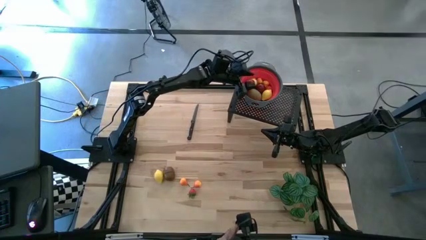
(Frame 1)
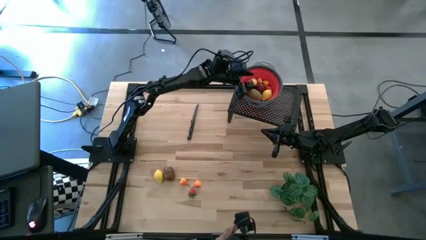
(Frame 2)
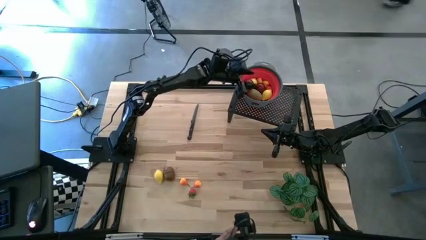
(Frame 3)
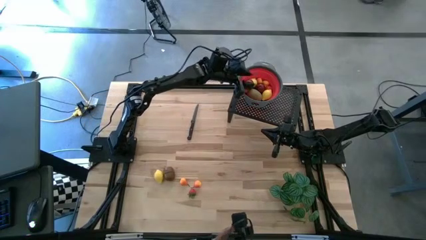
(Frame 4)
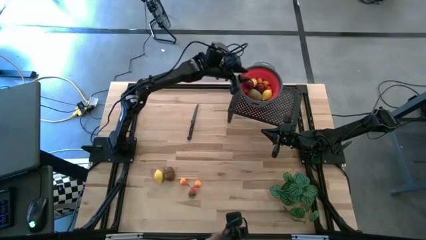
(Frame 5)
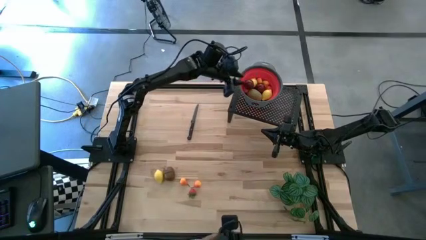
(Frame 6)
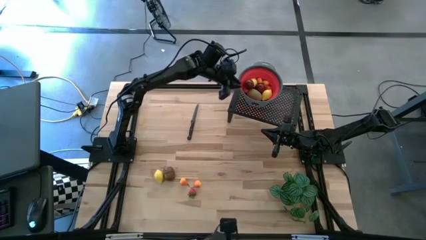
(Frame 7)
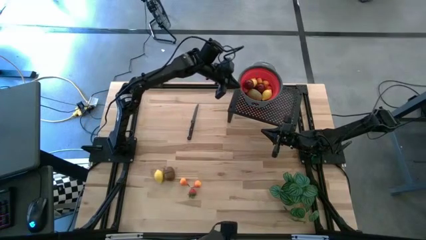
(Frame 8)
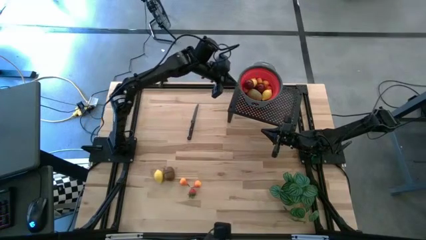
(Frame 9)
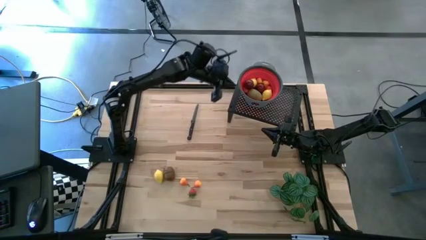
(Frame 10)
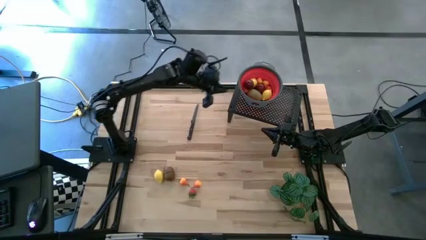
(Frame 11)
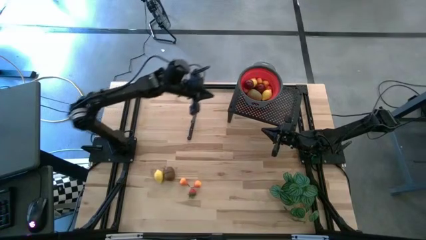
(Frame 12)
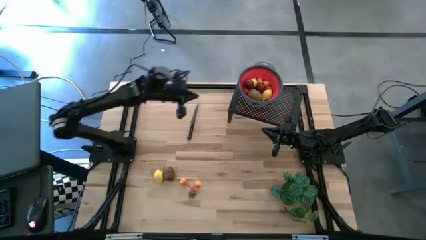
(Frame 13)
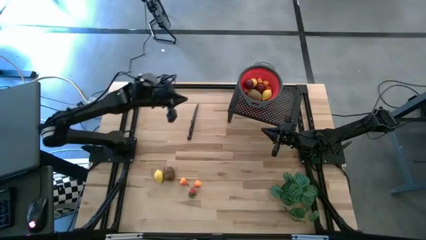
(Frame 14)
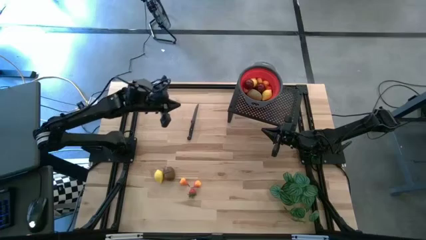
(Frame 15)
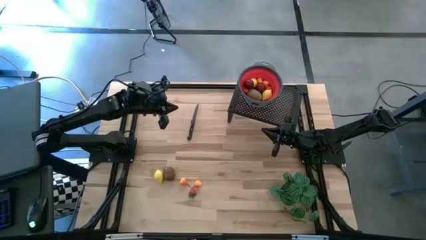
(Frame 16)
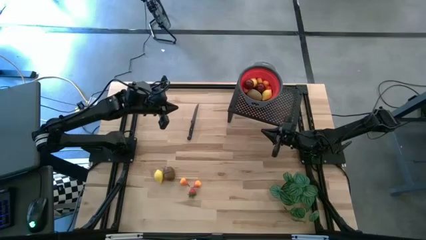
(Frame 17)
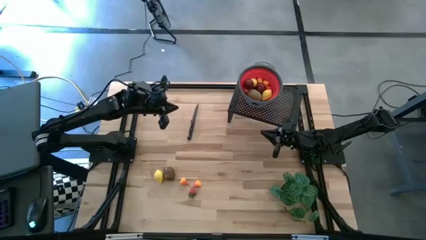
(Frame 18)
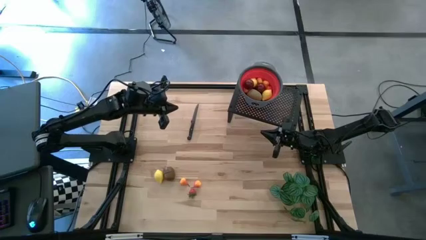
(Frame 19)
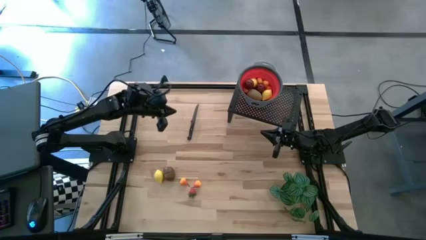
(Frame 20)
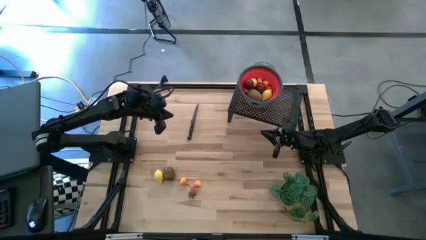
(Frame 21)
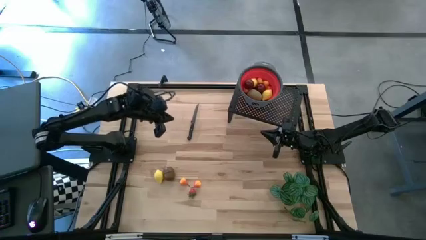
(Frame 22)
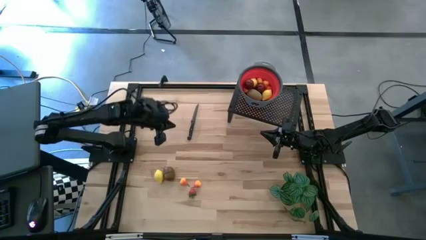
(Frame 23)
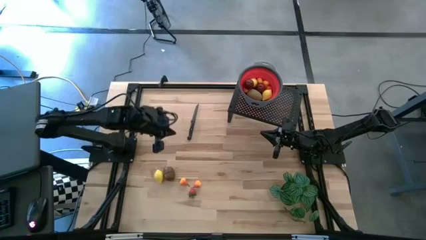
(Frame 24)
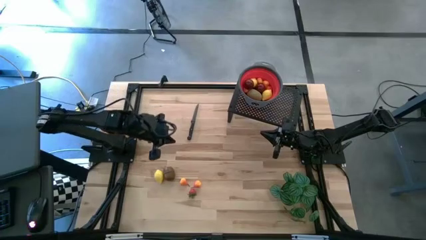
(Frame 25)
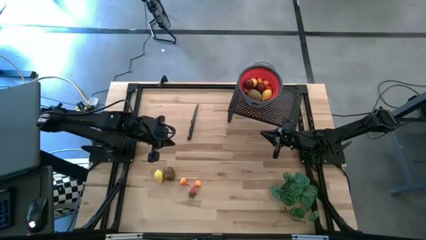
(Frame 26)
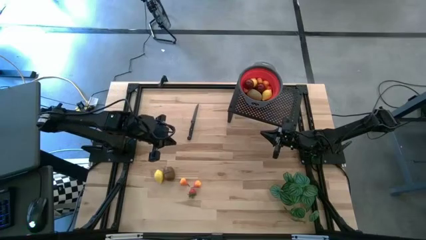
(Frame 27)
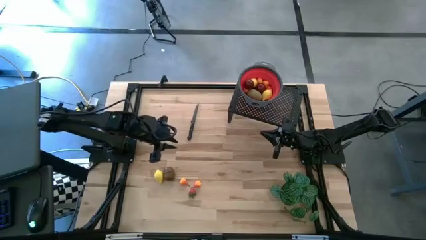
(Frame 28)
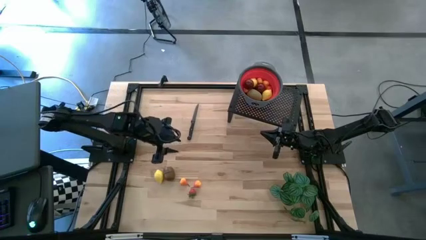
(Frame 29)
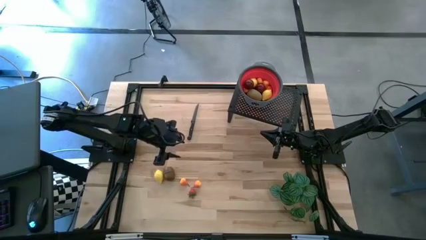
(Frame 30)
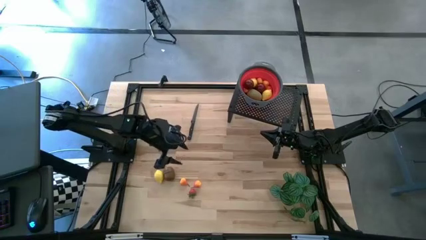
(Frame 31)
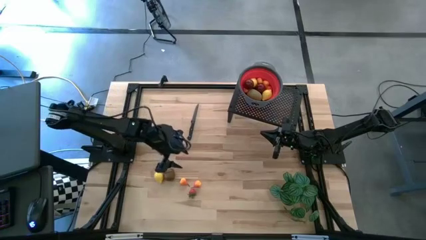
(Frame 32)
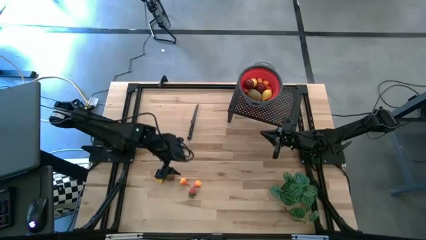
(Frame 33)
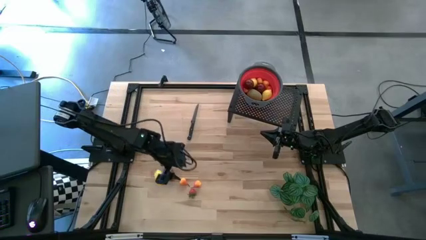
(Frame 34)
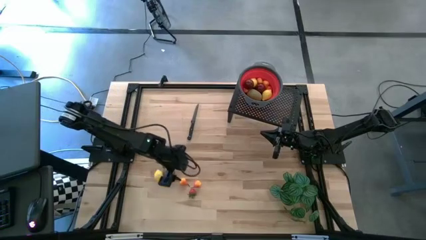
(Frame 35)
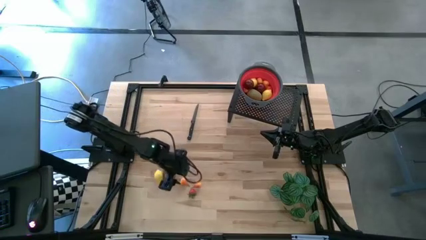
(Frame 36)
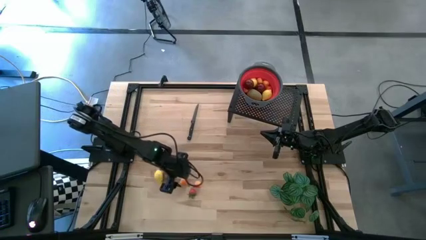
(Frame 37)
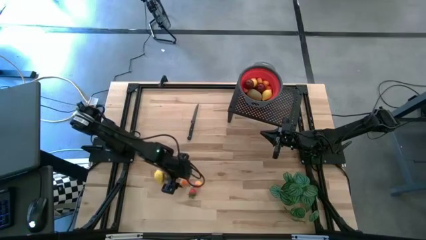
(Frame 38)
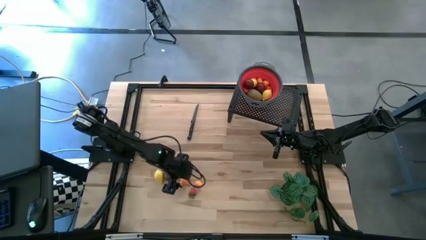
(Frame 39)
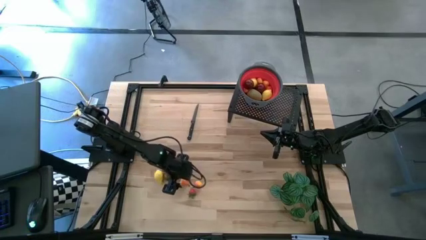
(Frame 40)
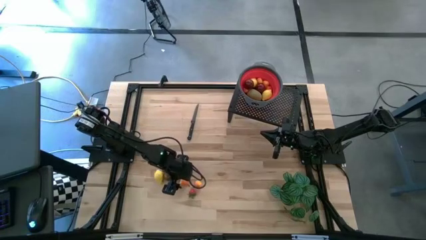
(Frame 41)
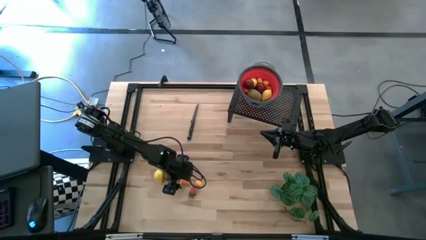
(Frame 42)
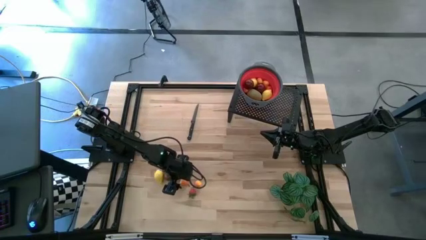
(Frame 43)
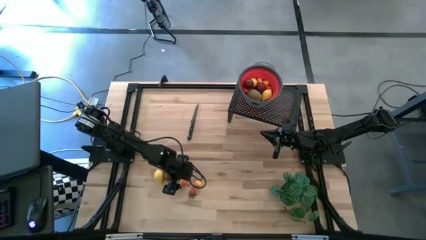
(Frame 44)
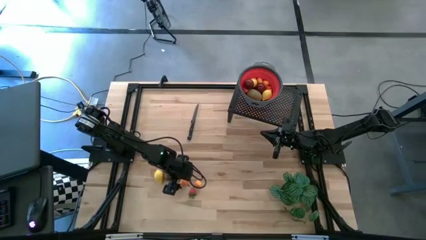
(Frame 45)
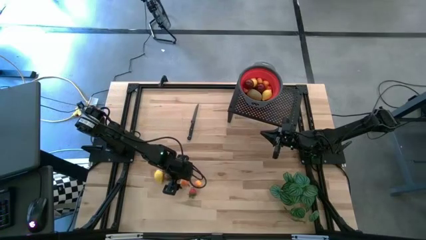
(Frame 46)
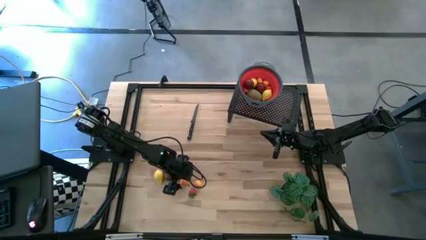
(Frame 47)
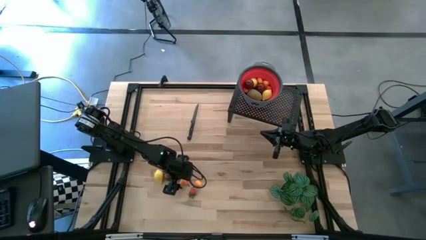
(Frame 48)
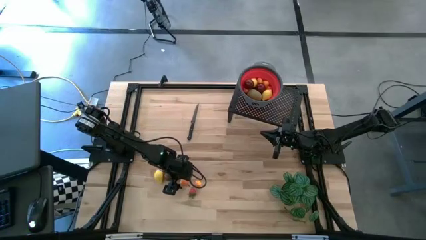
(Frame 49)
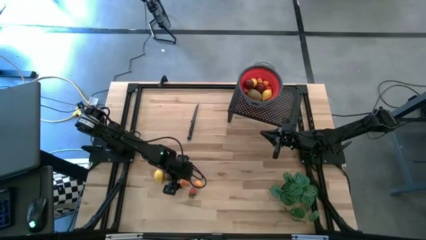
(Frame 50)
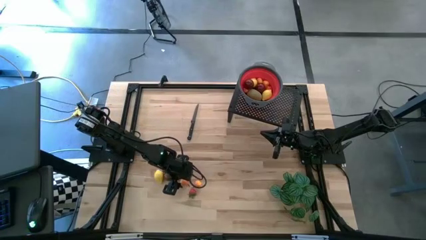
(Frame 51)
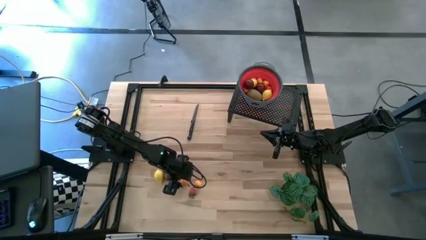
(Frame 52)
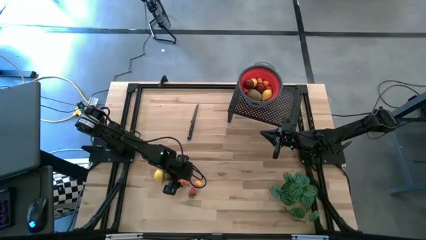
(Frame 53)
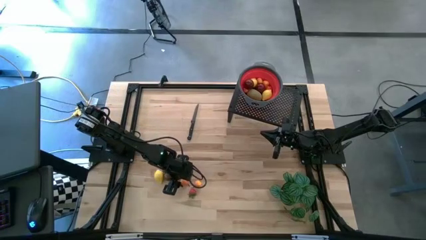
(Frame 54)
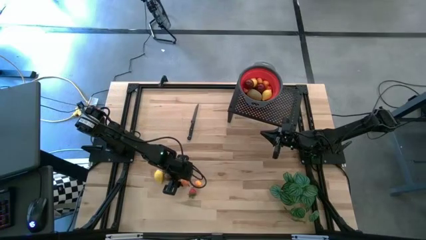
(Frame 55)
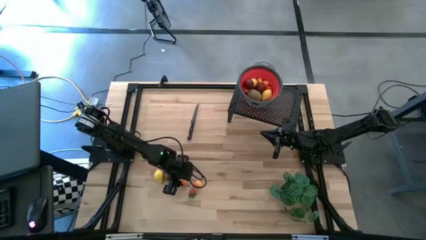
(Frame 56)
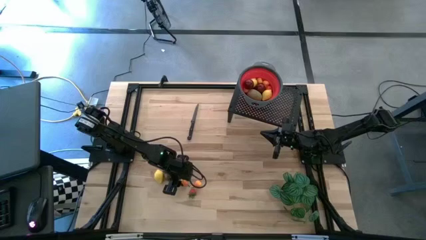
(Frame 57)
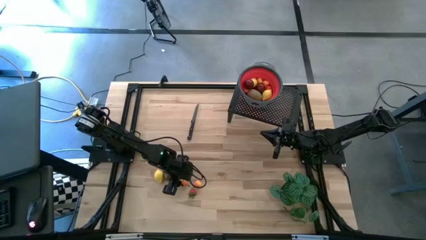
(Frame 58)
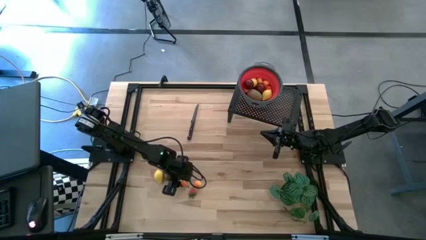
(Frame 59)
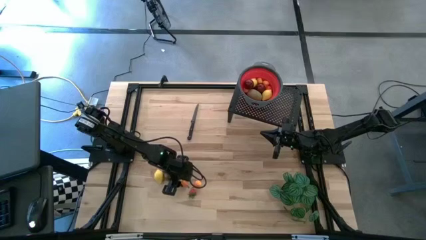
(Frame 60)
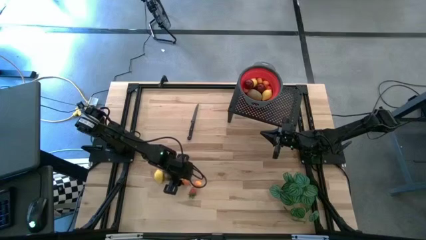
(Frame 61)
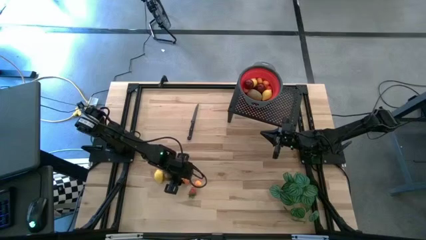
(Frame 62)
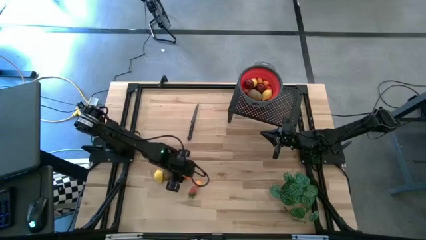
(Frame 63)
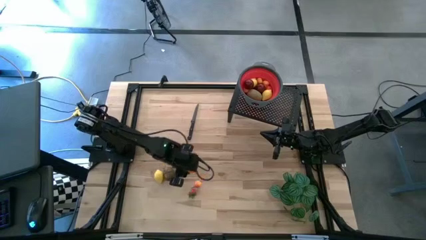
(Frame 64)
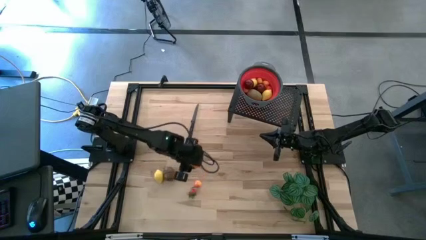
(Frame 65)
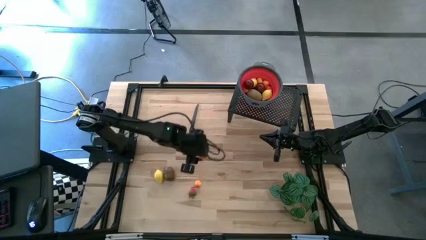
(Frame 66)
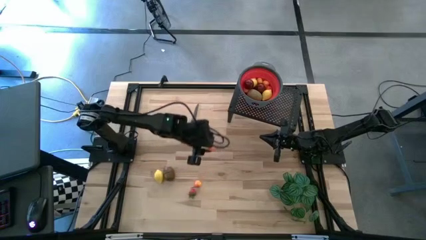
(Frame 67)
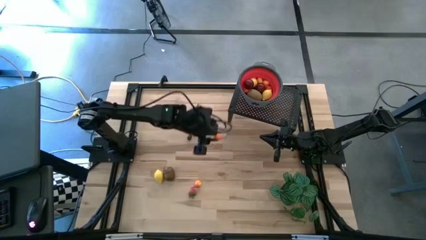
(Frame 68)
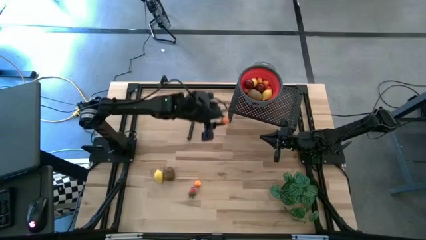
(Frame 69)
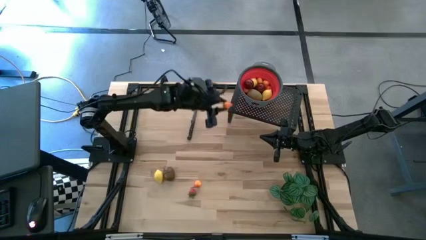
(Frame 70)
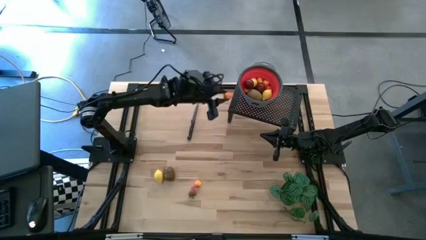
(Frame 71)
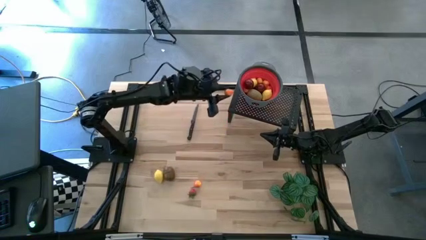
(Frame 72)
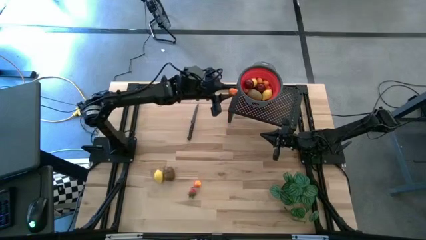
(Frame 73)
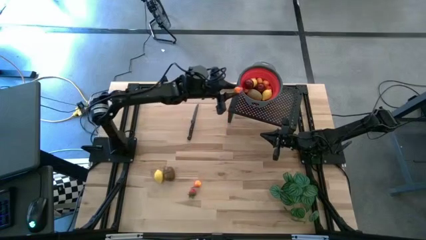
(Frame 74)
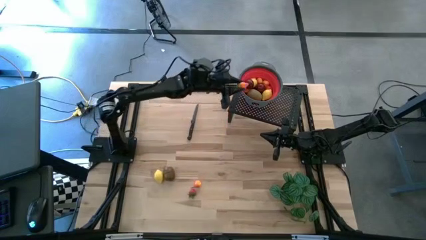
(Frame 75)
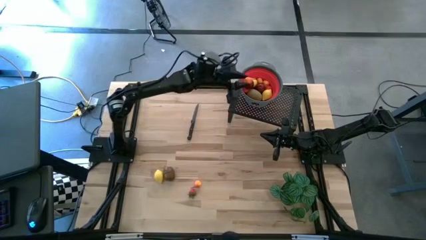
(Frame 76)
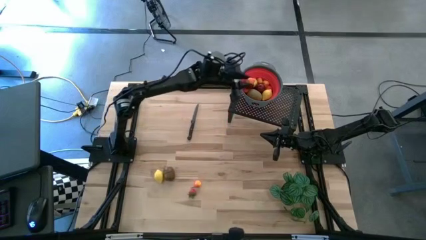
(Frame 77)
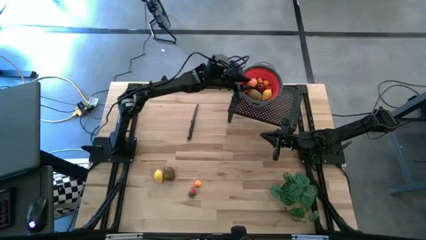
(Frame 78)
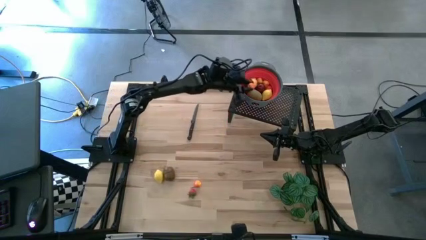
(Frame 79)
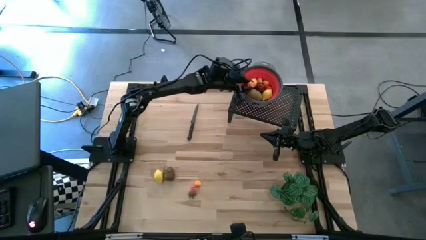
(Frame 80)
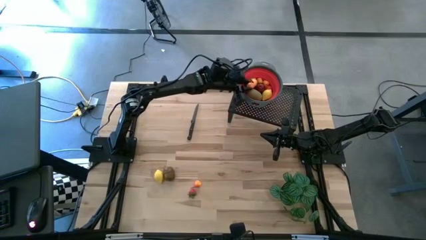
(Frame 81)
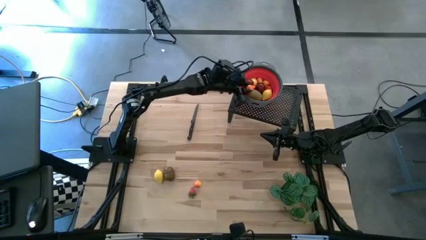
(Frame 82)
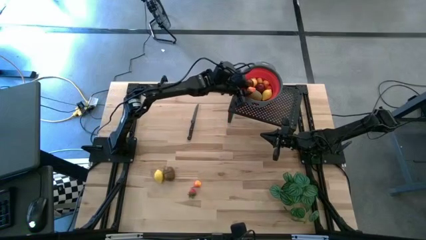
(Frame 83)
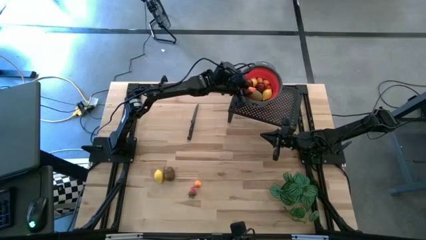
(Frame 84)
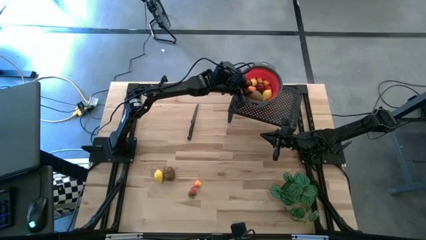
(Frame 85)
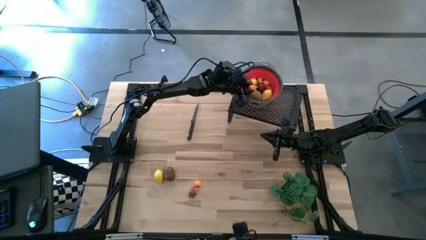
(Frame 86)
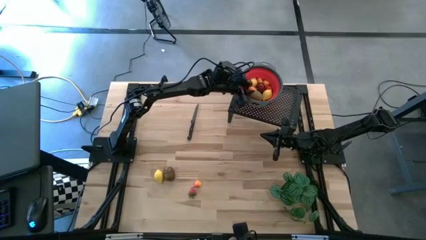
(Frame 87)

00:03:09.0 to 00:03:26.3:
Task: Pick & Place Fruit
Put the orange pear into the red strainer bowl on the shelf
